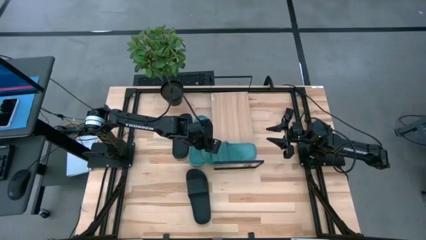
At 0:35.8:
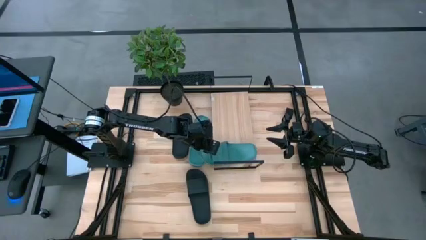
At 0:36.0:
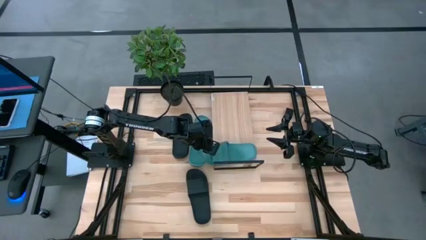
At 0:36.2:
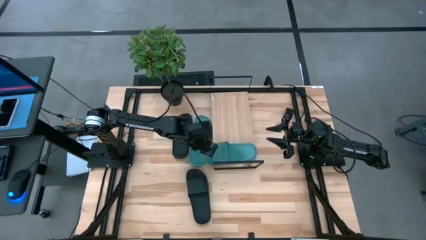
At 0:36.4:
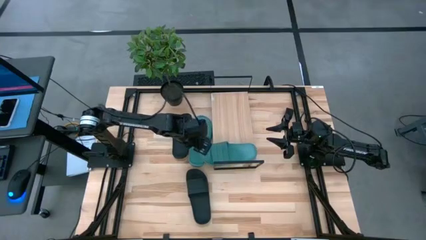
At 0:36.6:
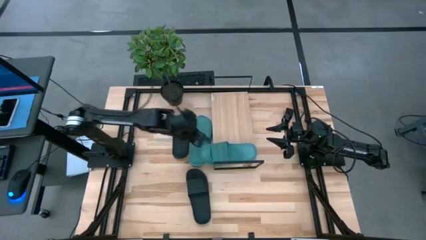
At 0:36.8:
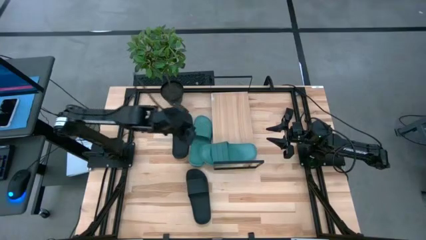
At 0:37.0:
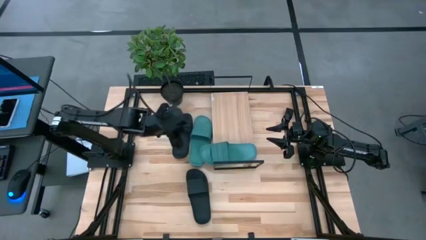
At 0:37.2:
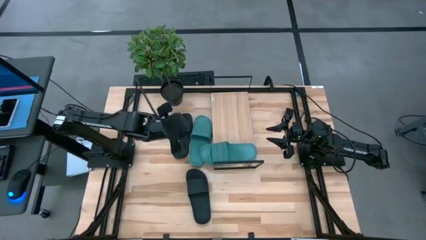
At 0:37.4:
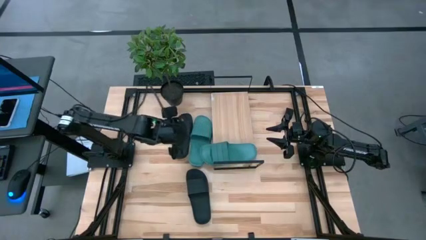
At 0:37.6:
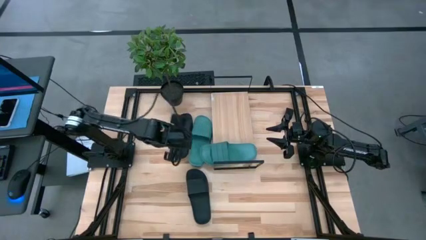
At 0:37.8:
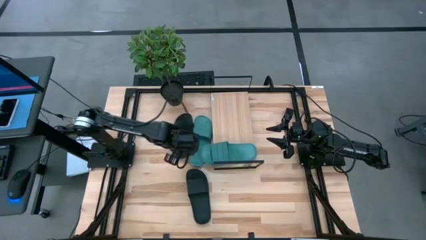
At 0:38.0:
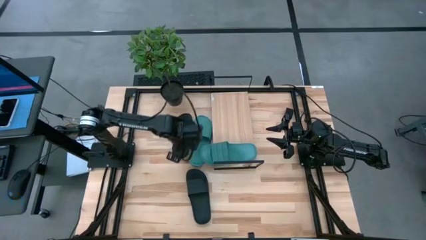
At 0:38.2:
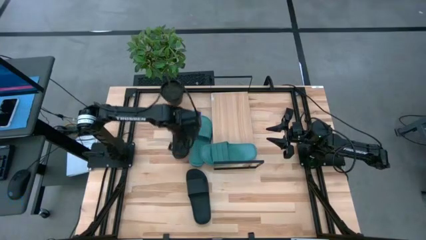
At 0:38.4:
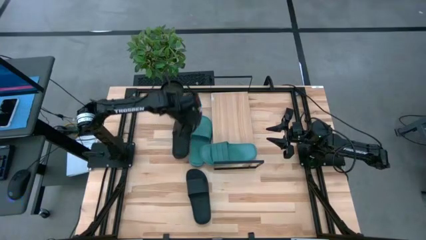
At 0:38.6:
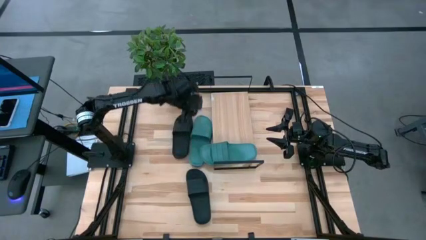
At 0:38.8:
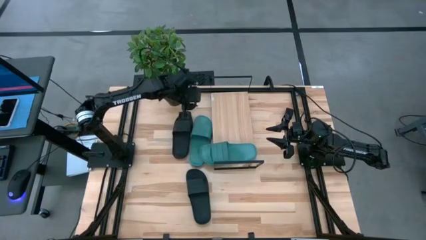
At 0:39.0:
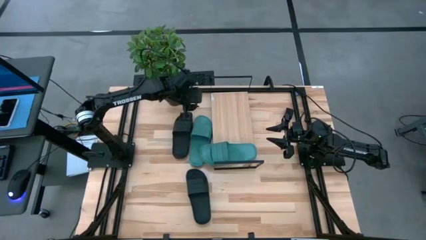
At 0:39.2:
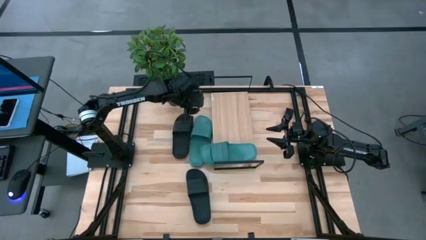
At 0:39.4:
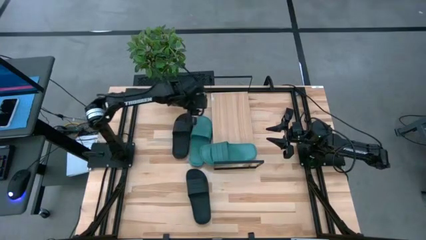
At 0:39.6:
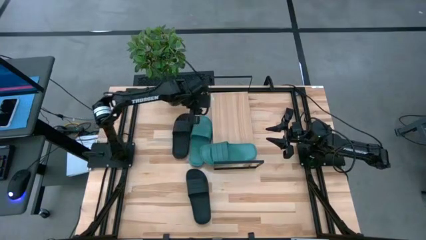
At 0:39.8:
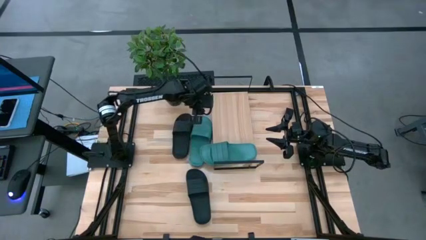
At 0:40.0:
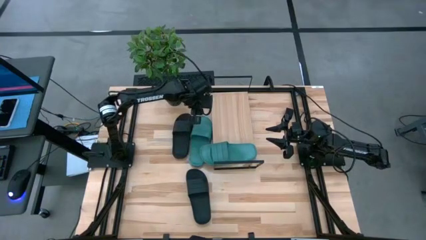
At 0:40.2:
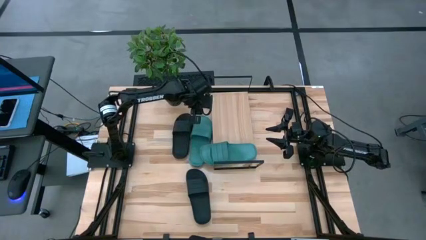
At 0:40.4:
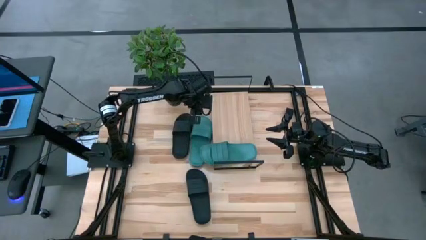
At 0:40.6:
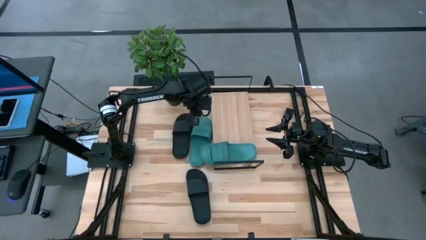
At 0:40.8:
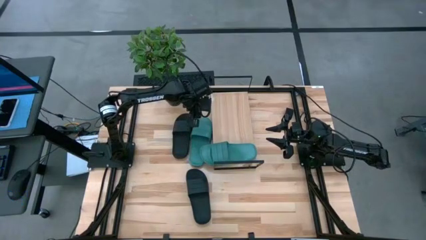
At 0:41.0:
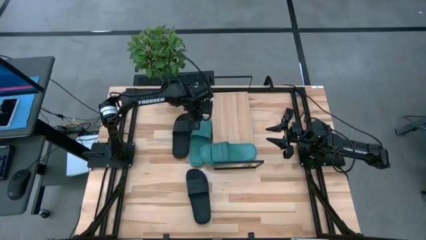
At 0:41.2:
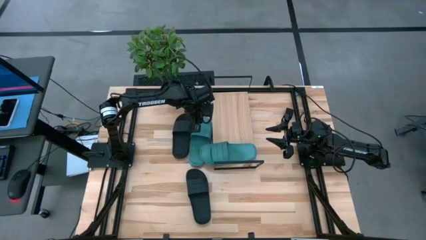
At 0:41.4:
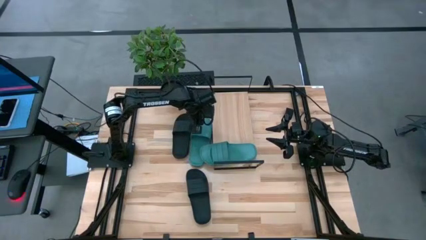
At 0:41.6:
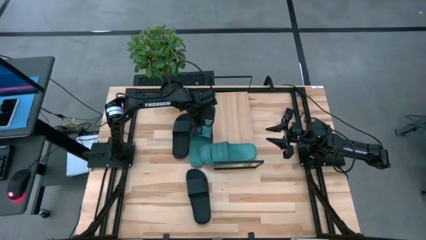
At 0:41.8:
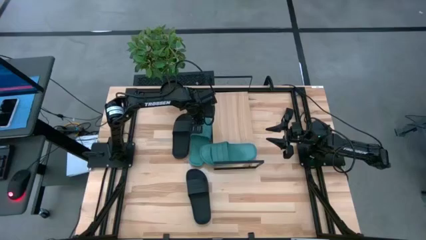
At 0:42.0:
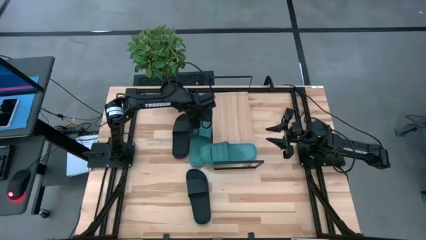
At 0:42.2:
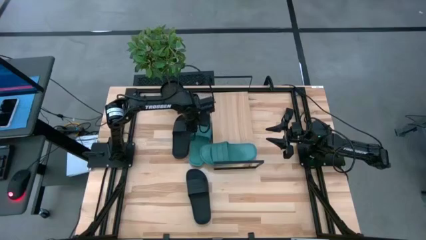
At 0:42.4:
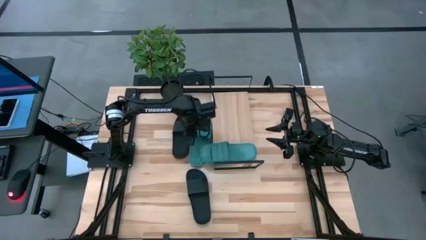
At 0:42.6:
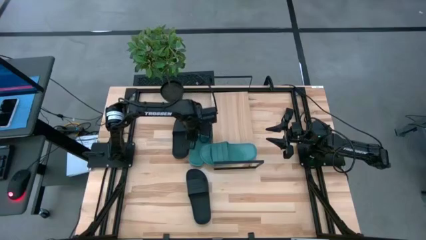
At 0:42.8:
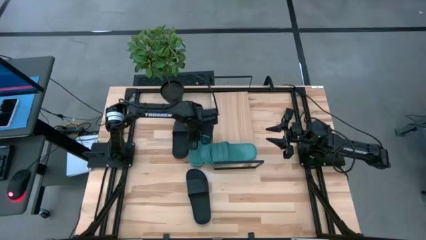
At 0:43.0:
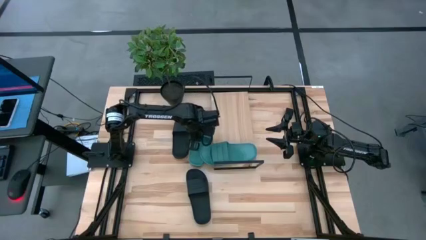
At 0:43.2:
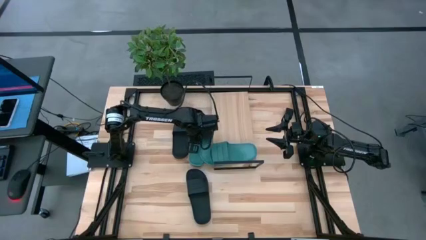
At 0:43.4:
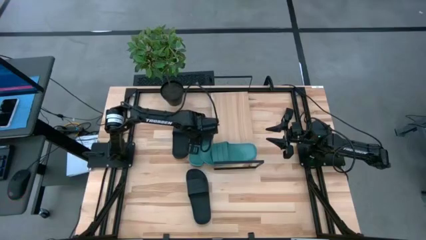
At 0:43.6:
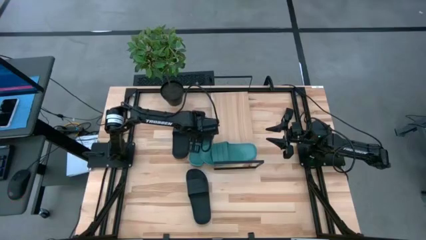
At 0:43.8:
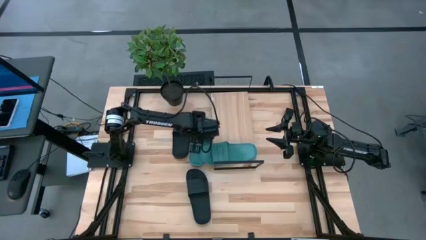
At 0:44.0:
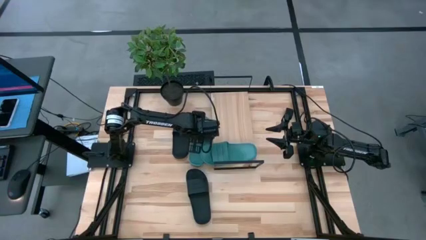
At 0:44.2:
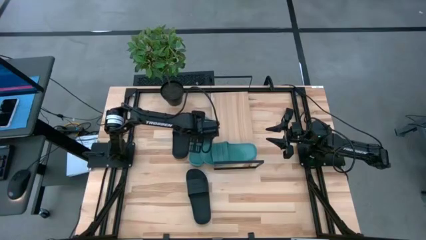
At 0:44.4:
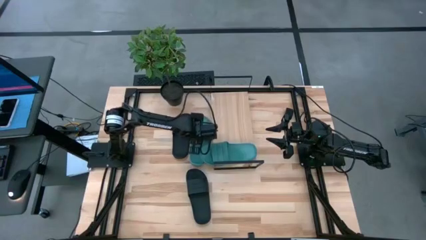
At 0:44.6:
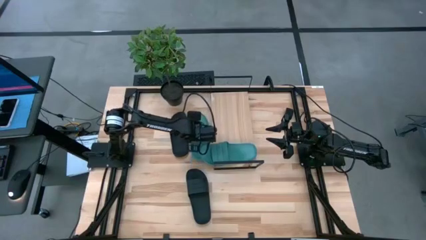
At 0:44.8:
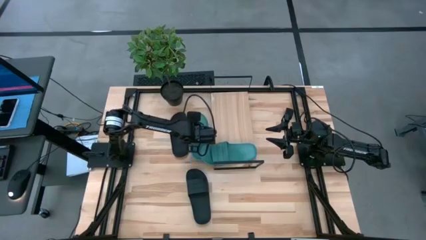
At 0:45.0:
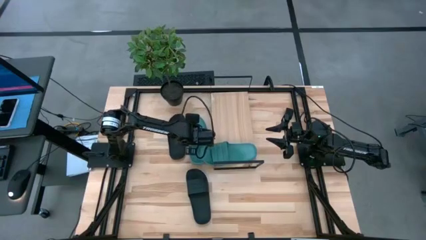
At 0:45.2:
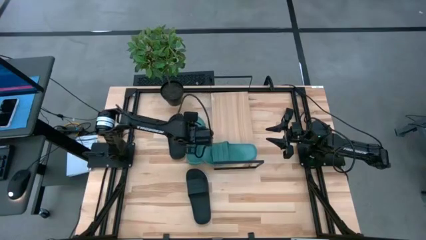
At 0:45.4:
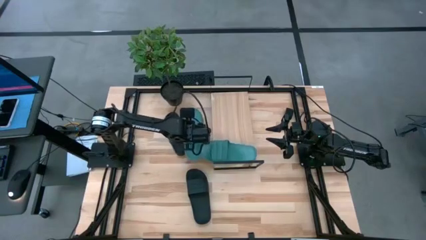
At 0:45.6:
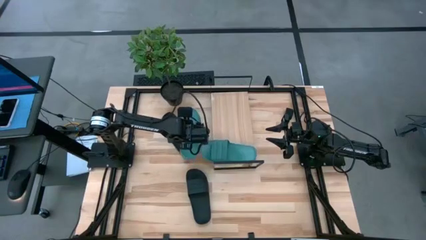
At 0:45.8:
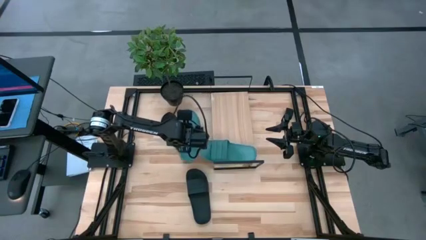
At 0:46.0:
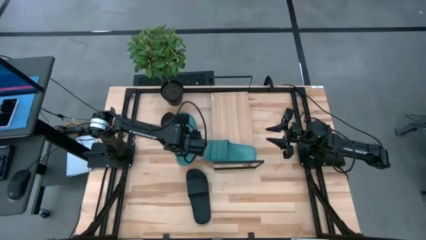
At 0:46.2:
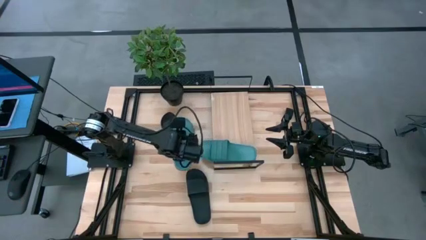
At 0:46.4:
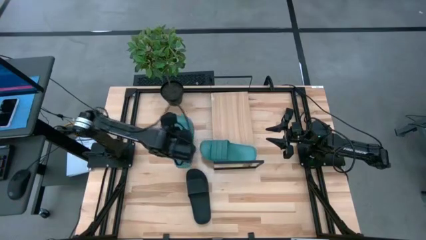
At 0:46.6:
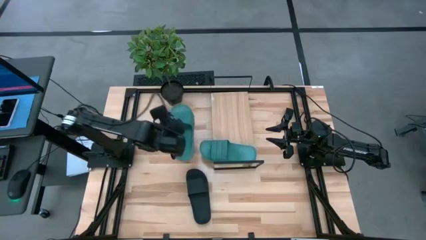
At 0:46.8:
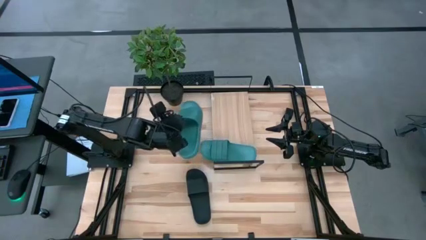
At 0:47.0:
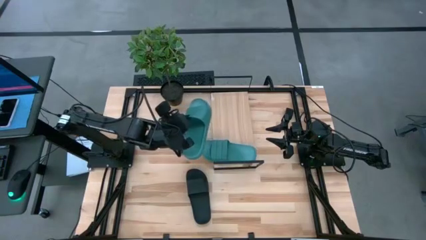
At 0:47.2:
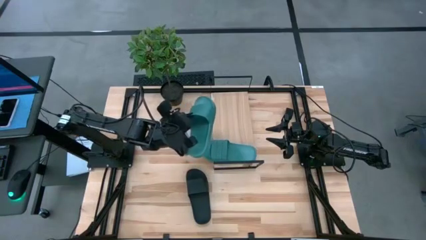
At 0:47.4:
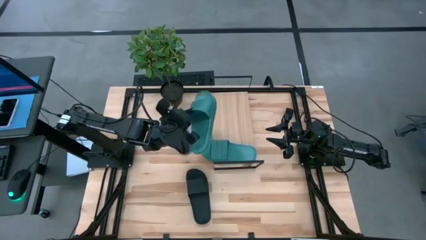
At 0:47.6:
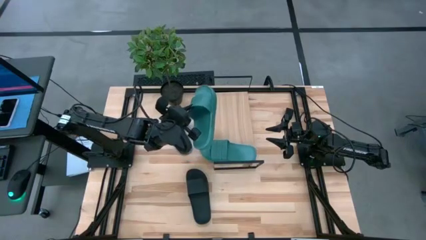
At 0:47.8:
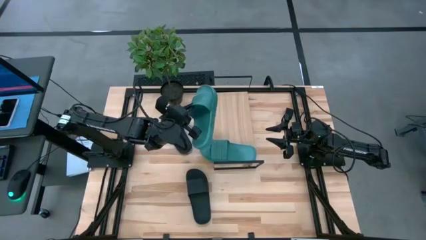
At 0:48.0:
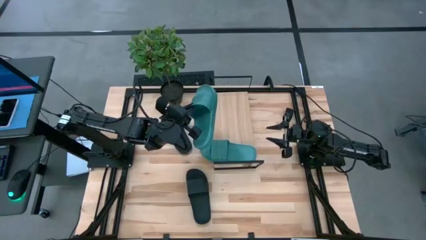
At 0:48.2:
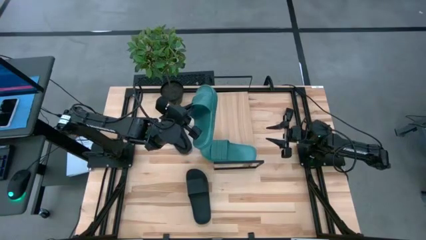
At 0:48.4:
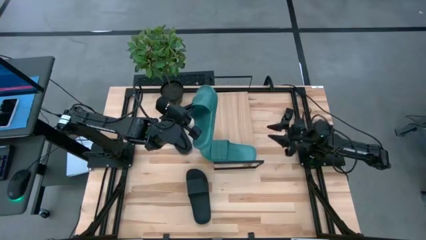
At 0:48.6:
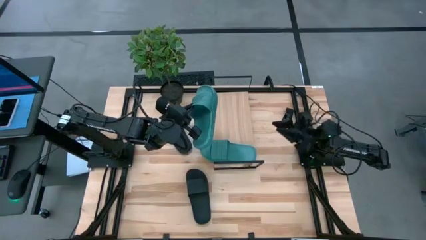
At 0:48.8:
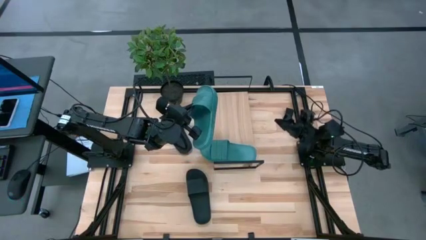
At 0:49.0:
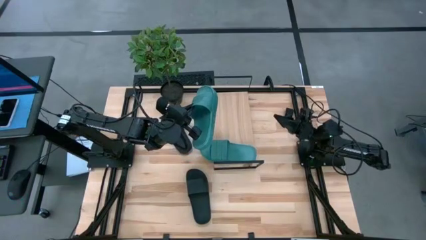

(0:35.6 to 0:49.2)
Task: Pick and place slides into the shelf
Put the green slide on the shelf

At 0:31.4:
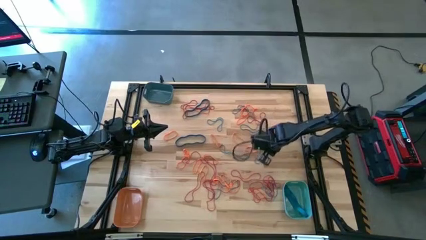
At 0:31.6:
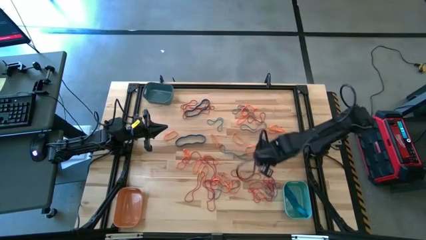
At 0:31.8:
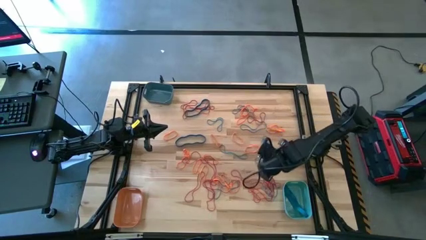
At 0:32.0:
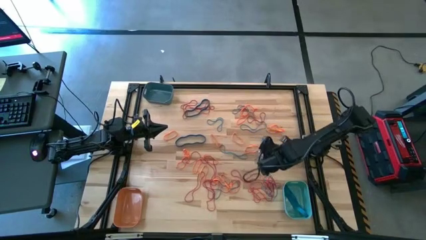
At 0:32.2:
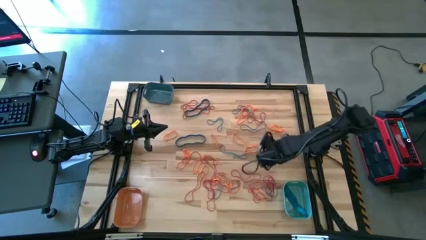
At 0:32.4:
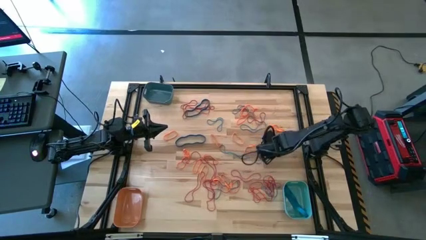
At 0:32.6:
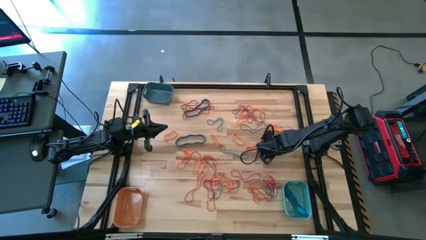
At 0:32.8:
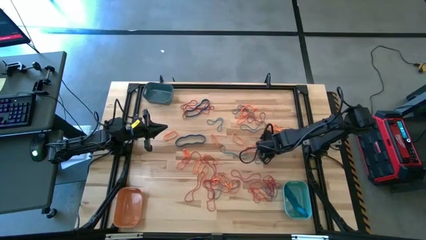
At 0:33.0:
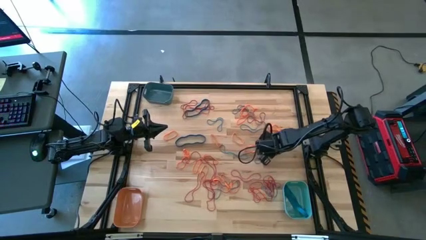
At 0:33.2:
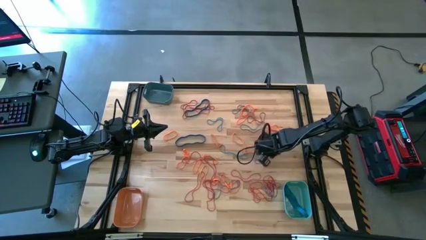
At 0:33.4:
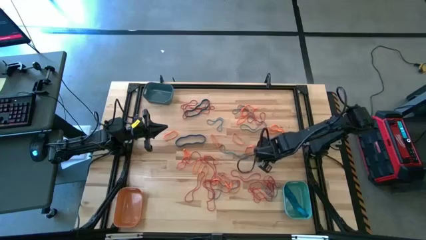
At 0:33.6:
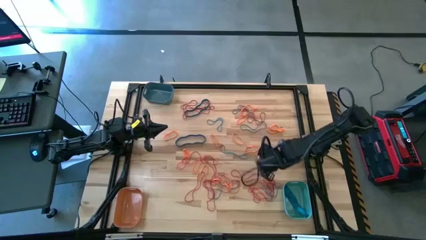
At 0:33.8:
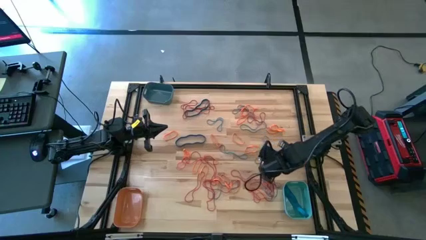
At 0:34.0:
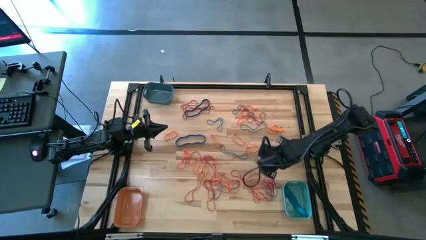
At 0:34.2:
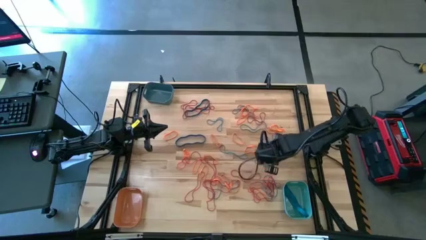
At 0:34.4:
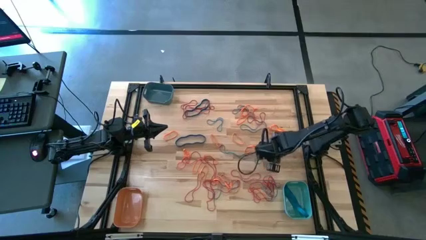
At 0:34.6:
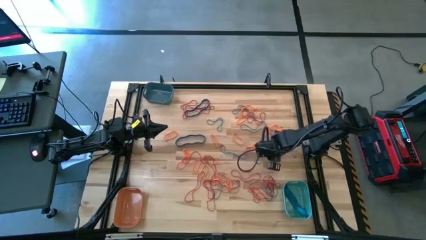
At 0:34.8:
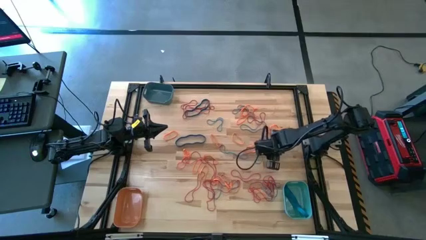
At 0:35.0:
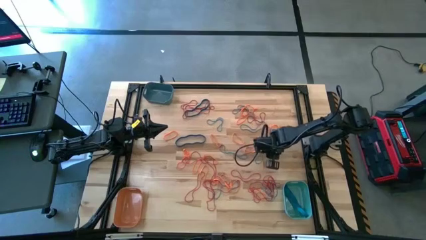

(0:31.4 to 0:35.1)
Task: Sort rubber bands into baskets
Put the blue rubber band into the light blue bin

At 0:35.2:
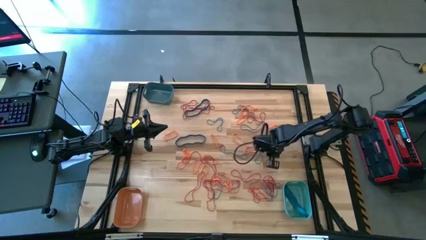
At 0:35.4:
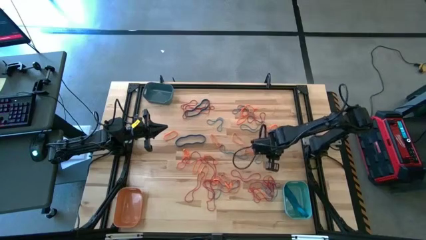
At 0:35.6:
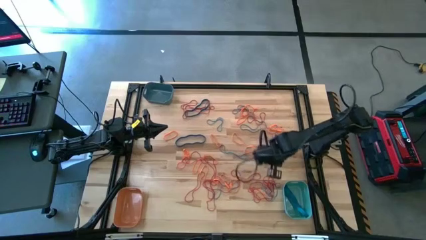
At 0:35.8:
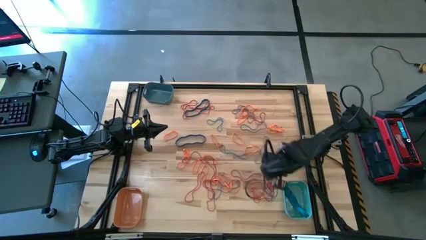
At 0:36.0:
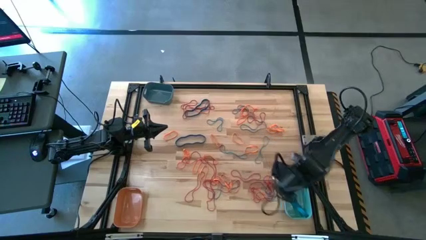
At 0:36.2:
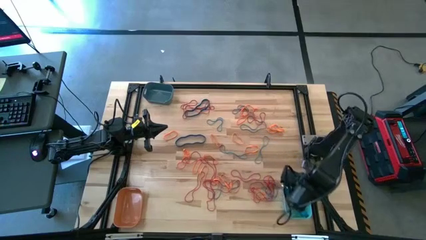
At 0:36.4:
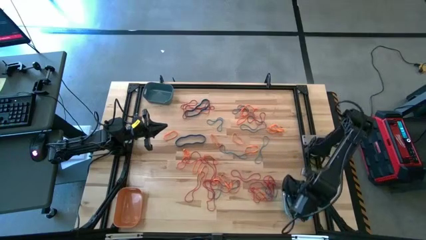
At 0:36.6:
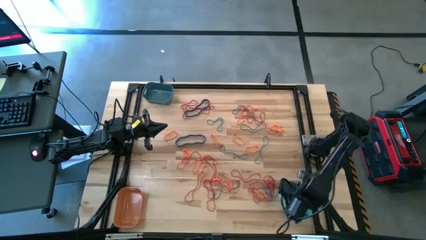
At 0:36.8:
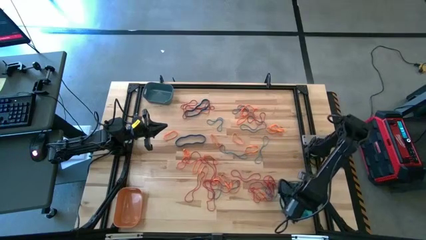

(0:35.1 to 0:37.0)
Put the blue rubber band into the light blue bin
